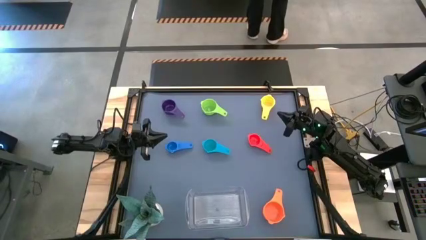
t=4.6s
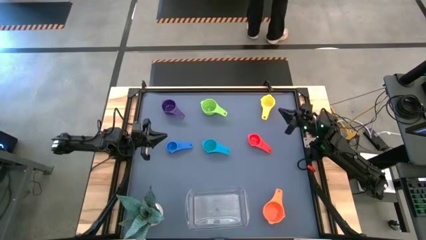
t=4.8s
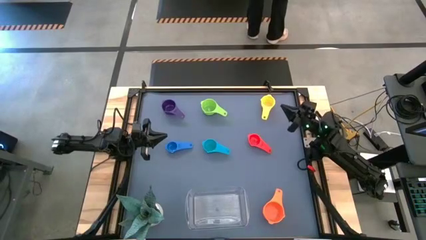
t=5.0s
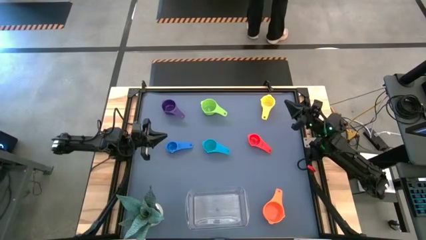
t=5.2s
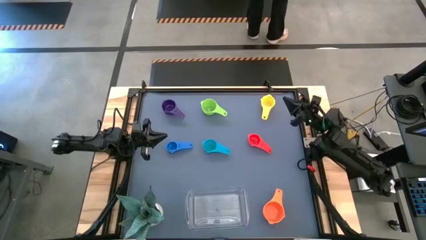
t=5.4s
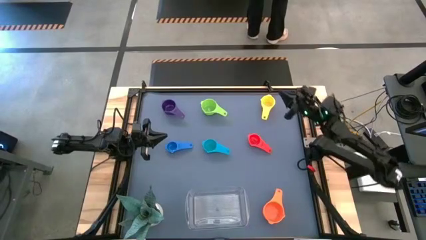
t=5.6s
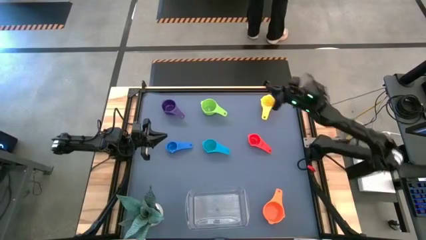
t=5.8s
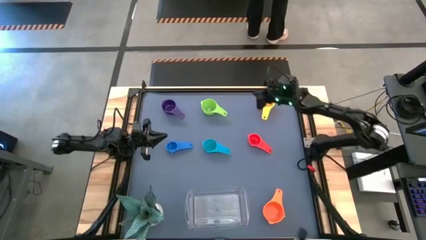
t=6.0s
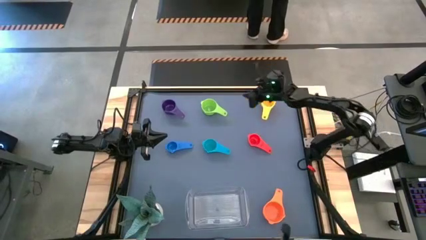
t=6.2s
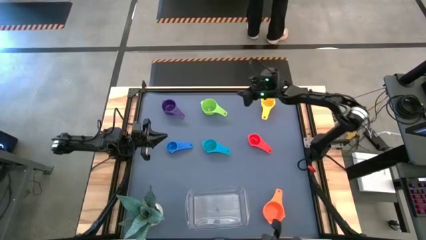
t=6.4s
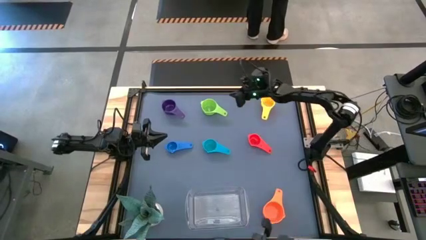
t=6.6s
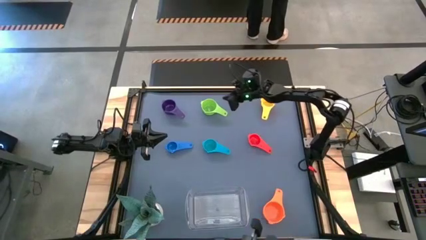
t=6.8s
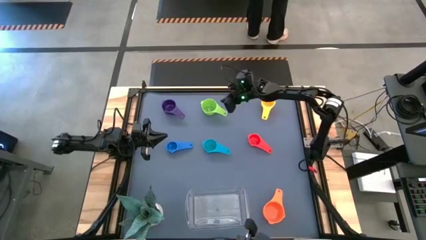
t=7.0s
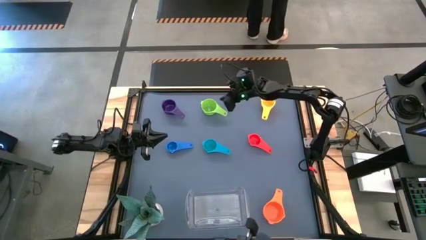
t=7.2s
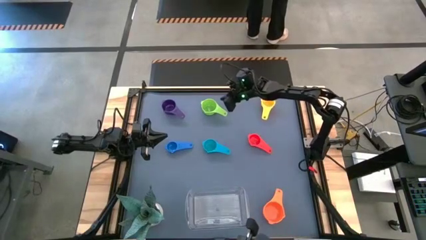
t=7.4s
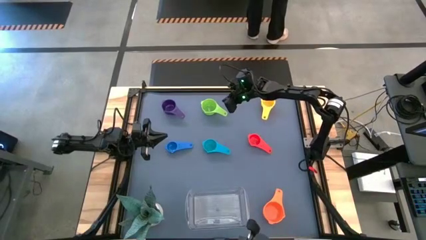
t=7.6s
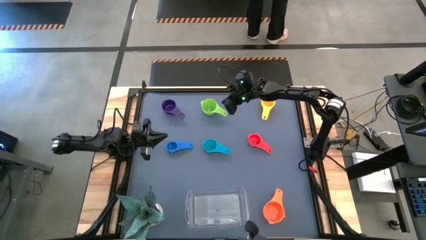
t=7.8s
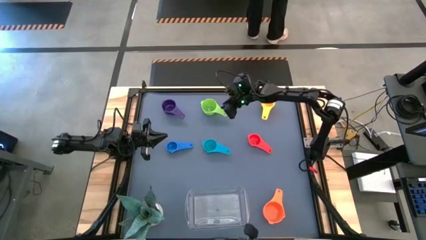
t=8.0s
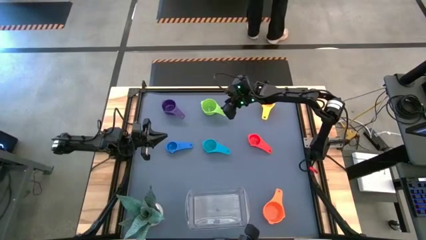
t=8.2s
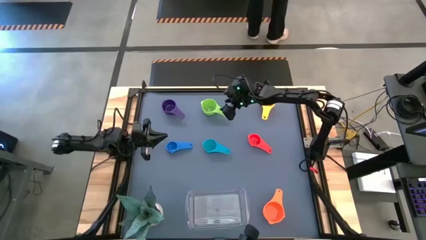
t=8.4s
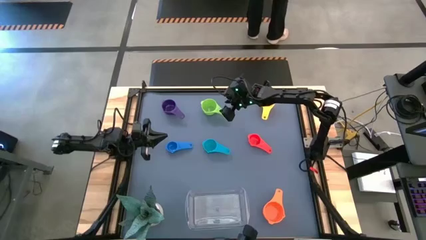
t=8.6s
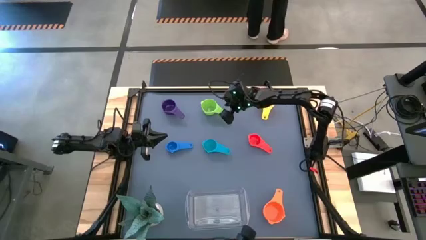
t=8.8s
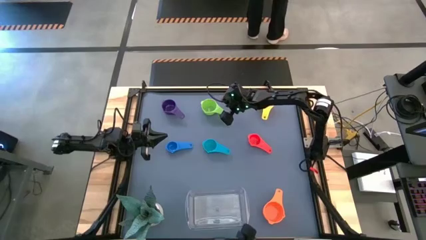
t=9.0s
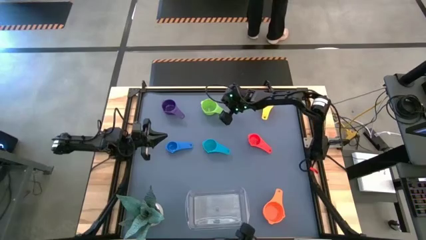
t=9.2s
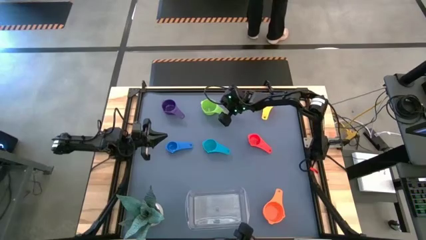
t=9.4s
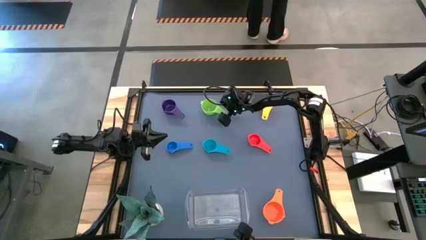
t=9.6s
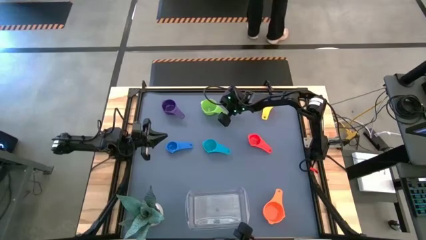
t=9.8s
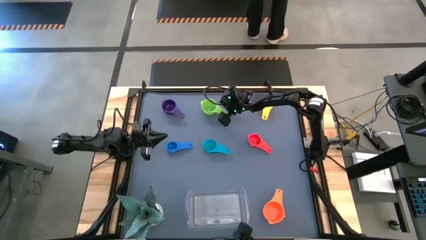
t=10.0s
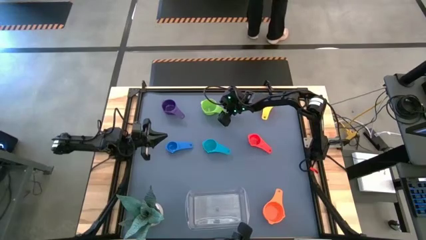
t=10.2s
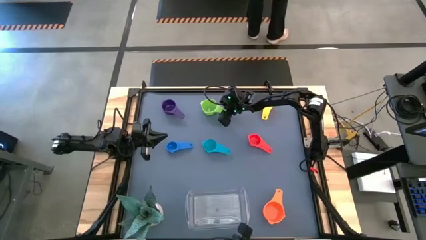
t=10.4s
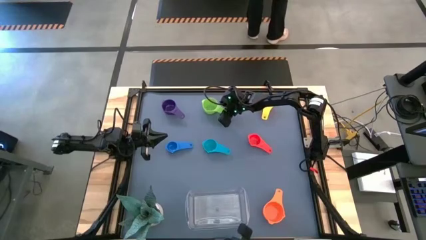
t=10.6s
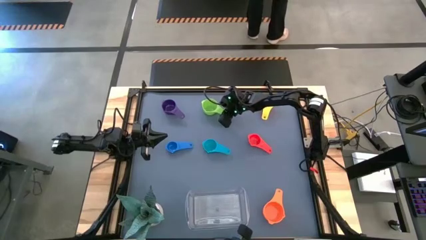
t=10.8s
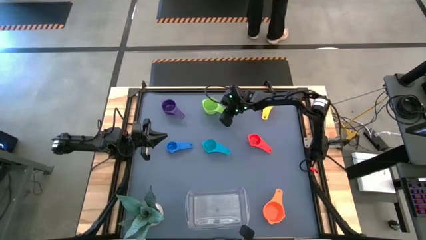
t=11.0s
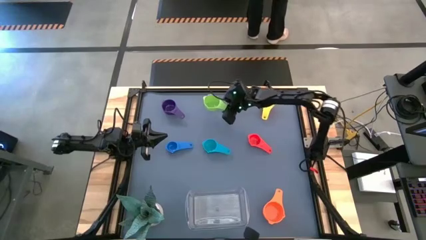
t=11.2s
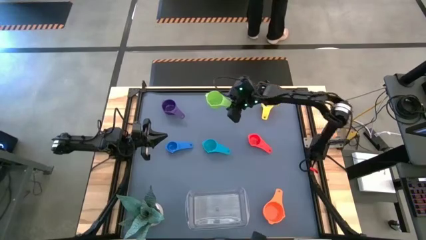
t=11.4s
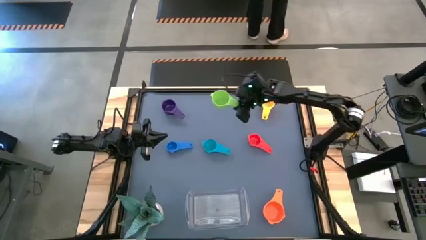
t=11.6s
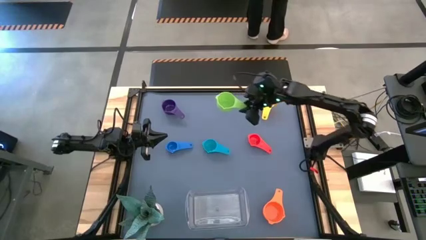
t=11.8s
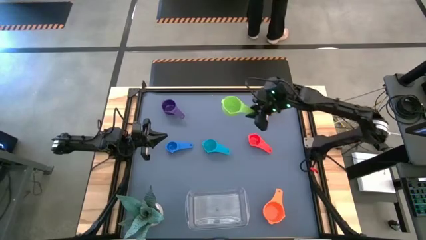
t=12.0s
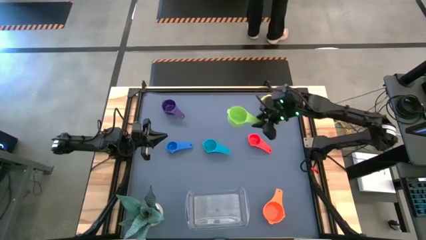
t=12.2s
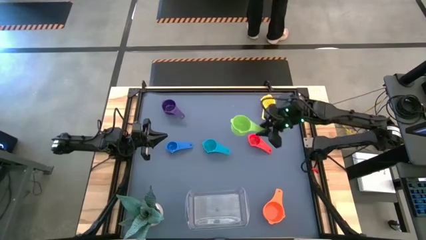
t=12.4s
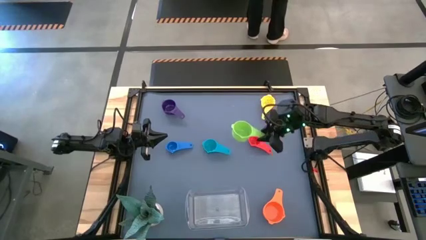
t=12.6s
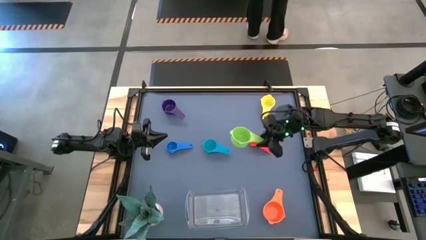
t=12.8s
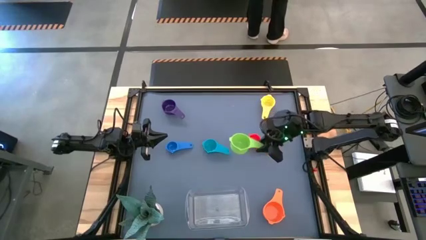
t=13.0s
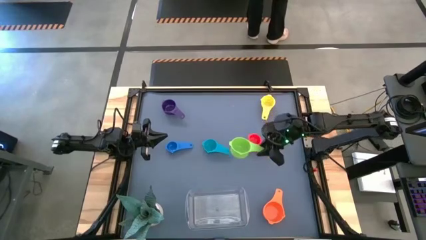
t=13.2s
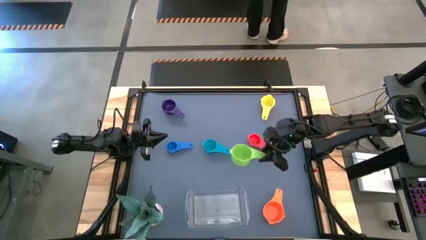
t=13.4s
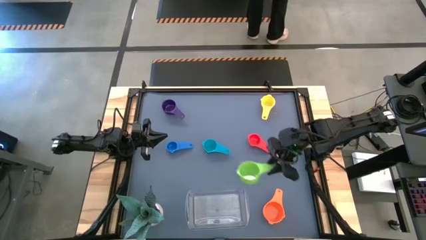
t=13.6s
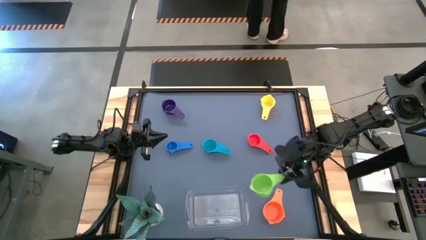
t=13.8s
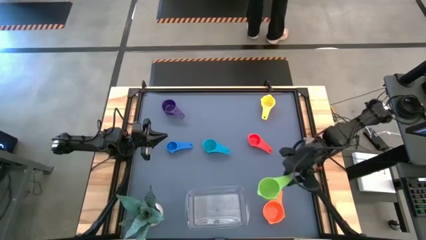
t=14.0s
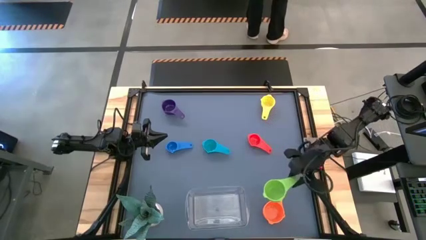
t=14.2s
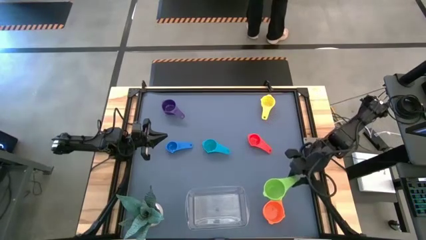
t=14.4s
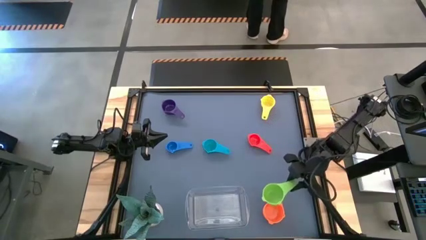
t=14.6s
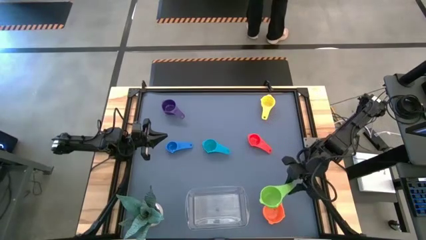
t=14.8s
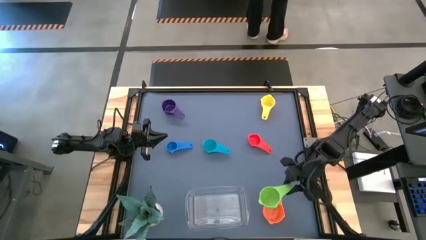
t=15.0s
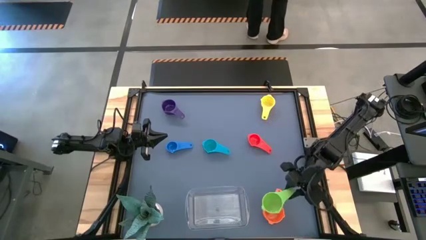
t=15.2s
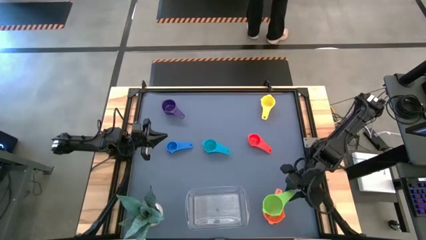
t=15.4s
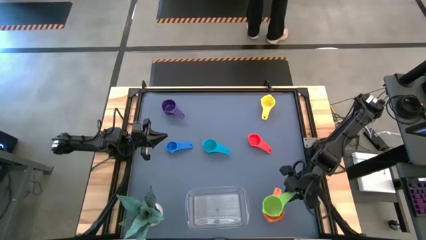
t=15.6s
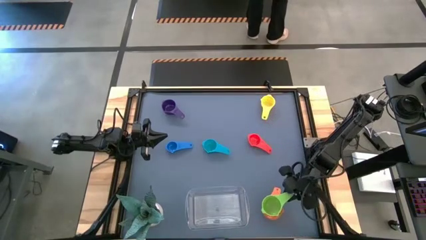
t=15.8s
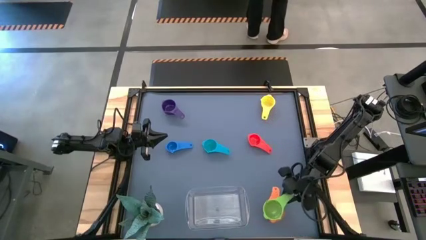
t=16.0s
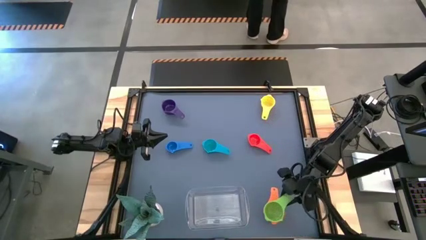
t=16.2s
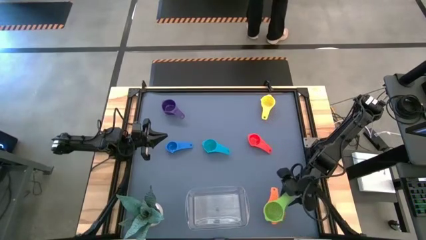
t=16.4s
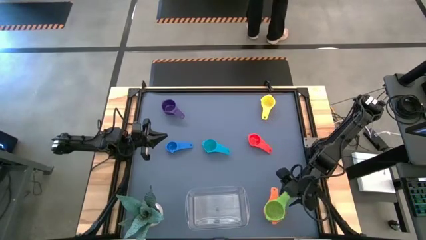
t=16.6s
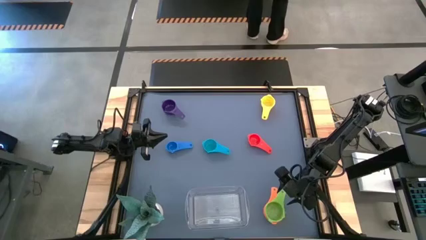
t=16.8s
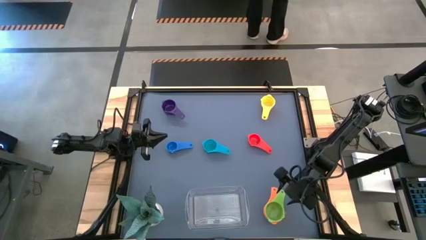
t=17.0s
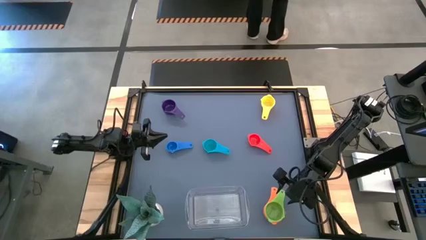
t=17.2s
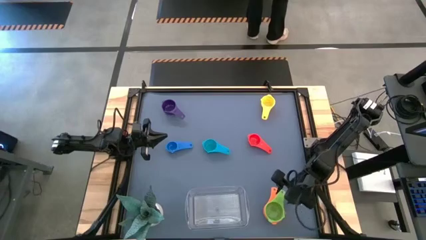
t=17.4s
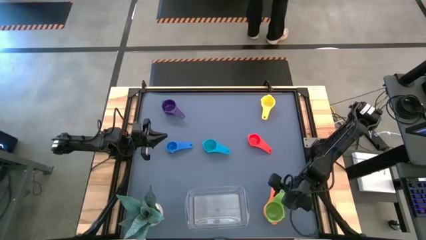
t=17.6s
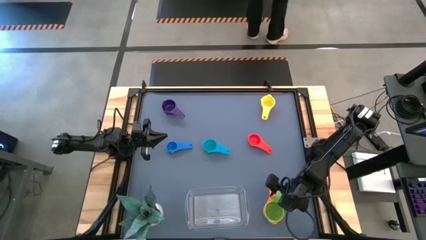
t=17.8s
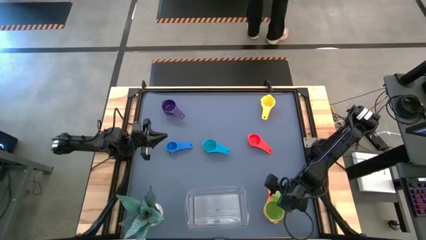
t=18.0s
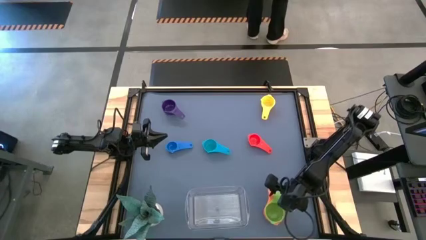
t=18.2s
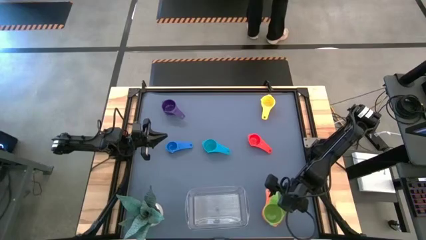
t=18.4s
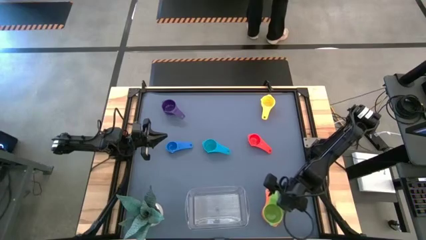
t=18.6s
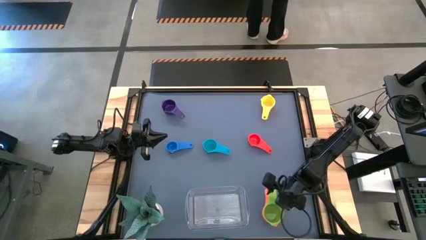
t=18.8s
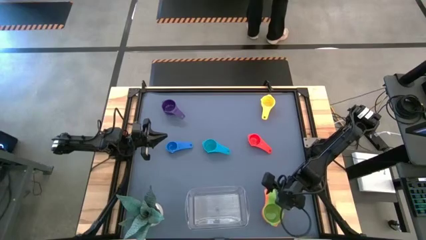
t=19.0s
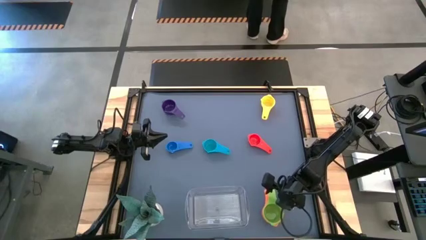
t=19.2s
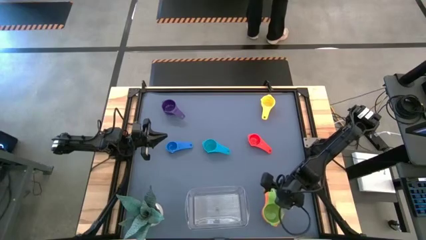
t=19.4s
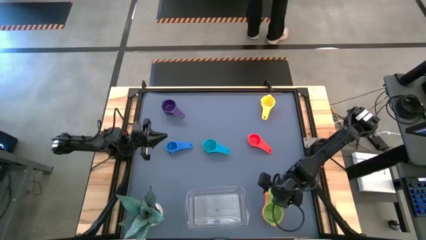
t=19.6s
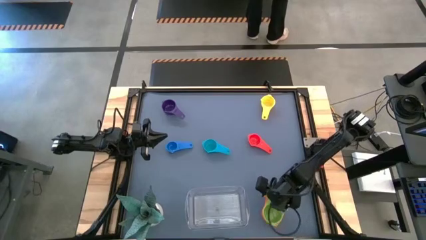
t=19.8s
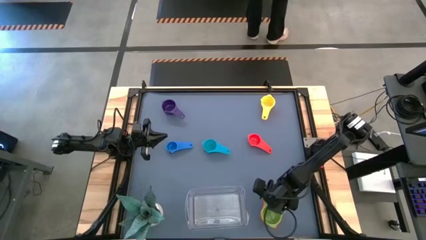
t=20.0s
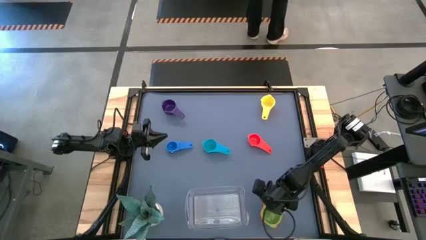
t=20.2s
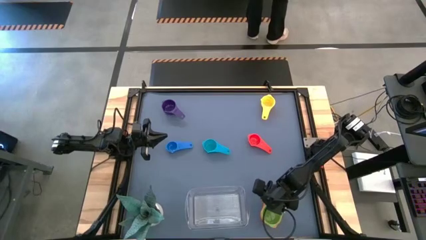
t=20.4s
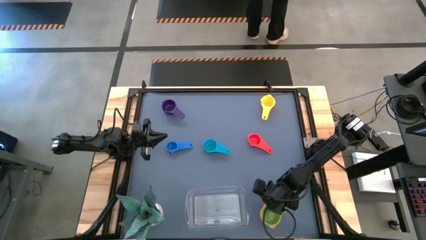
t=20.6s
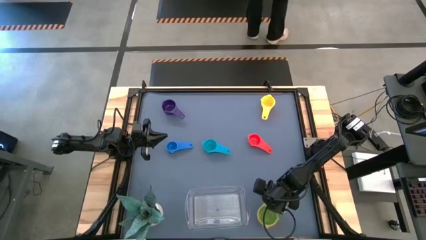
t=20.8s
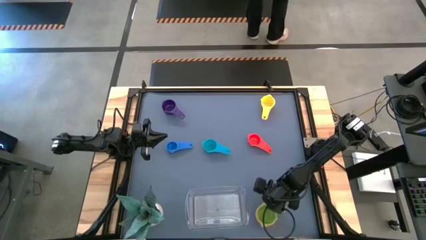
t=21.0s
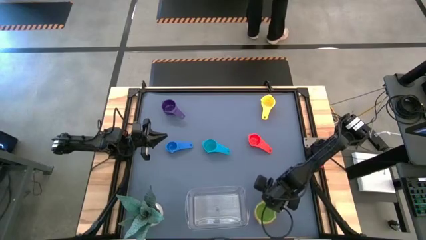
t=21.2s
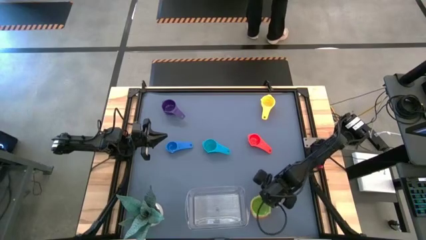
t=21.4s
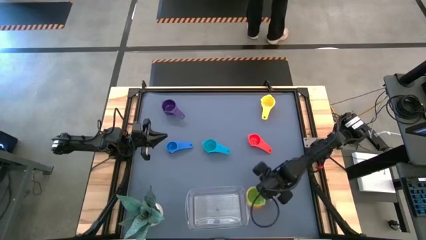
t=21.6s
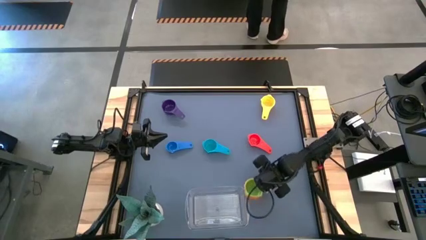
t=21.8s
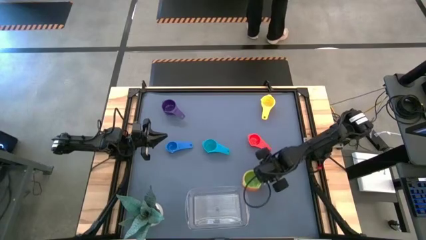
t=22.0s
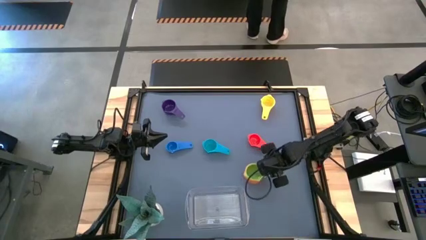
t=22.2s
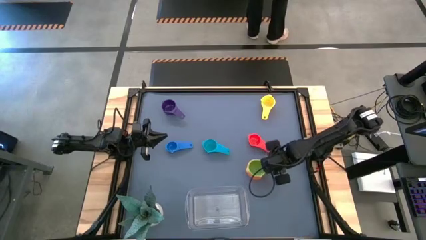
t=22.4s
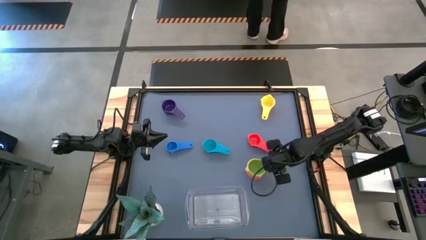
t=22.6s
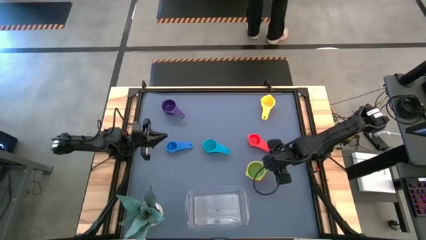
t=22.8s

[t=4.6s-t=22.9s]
Task: Nest measuring cups in basket
Stack the green measuring cup on top of the orange measuring cup
